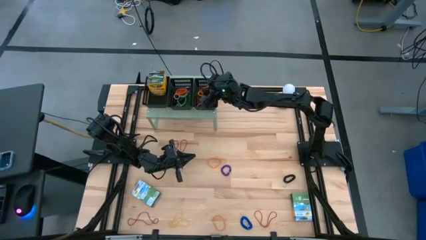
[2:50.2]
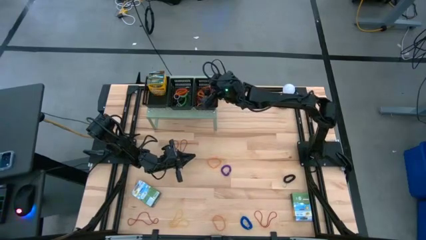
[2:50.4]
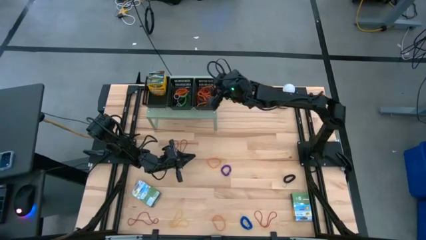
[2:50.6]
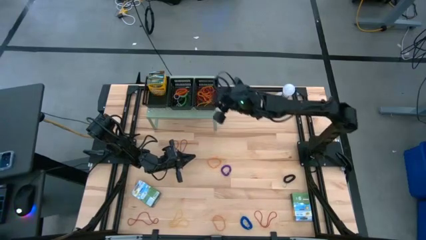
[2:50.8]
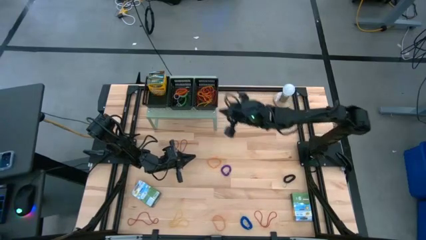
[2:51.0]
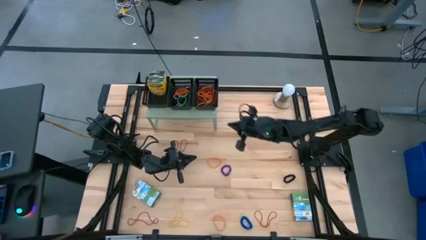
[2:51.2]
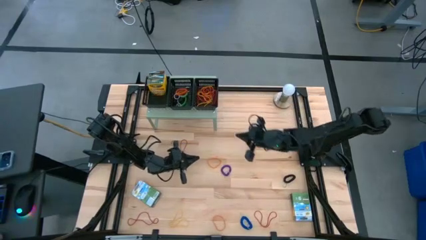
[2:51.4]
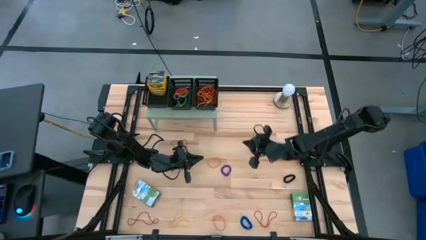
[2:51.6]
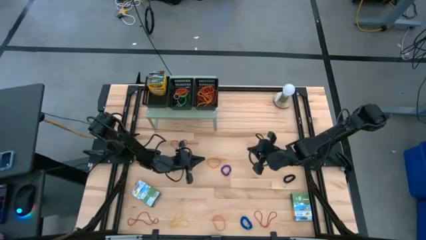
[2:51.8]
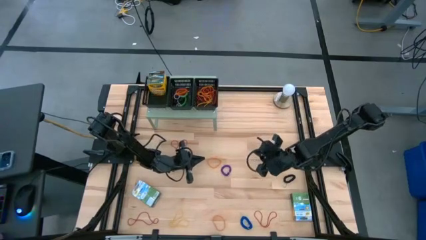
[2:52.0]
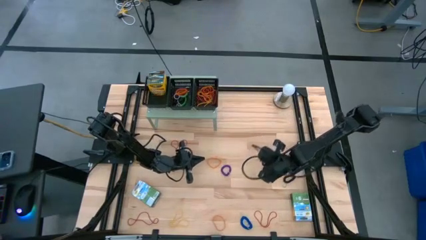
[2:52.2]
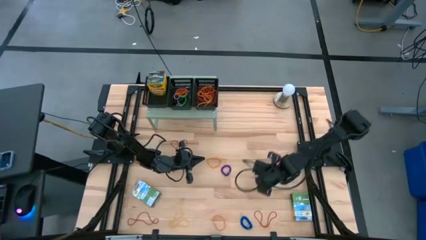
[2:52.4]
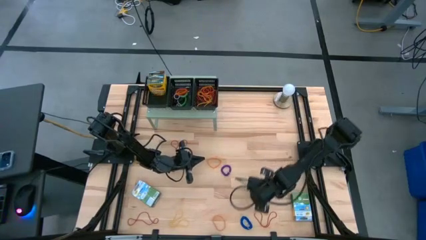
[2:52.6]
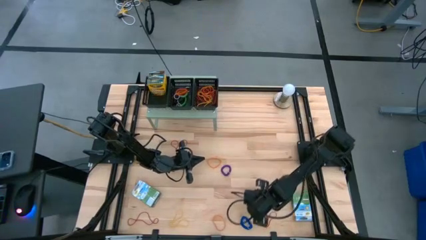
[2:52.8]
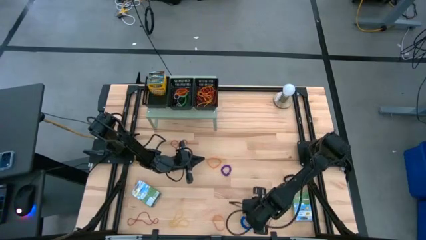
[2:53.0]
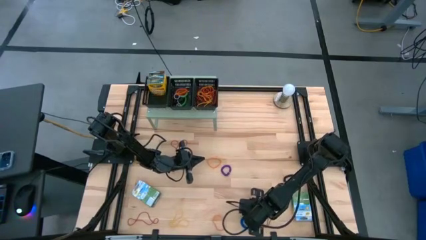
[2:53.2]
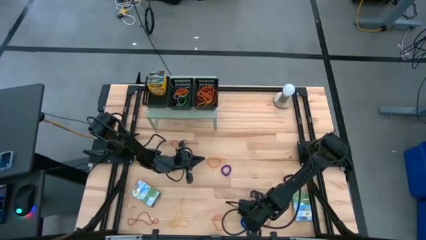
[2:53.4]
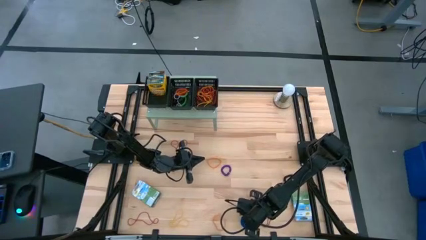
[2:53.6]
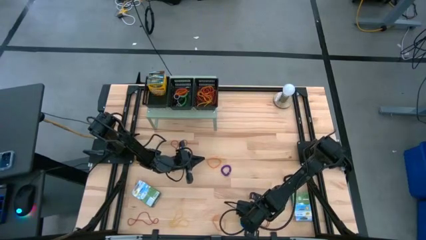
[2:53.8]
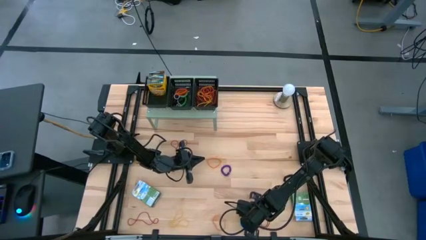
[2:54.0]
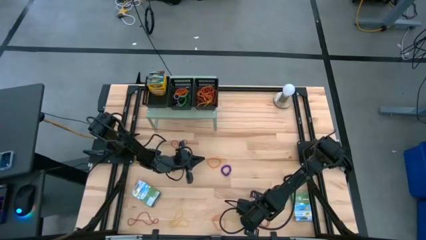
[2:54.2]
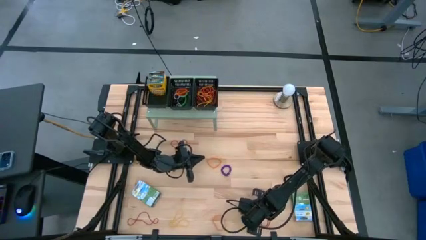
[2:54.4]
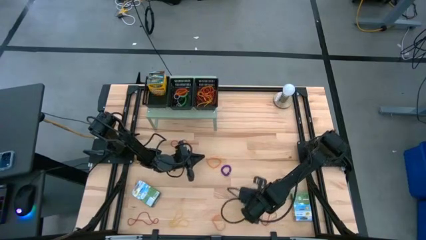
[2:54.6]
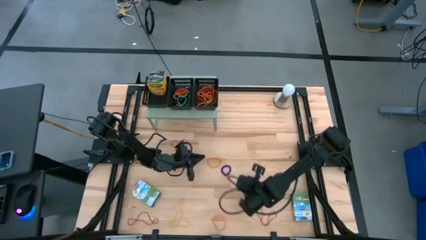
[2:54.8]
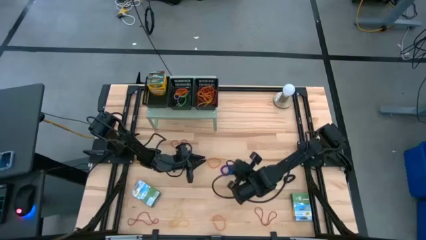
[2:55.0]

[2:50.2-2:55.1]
Task: Pick & Place Office Desk Supplies
Put the blue spring keychain into the middle black bin on the shelf

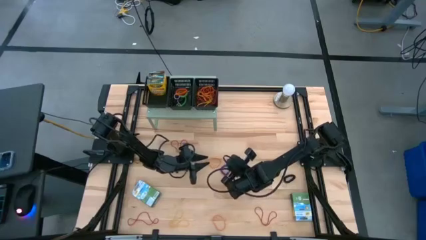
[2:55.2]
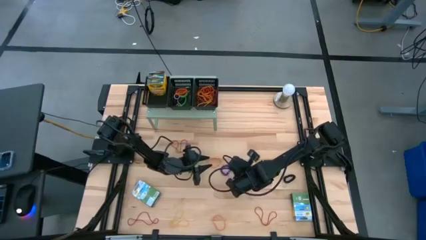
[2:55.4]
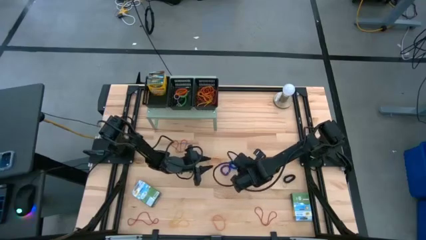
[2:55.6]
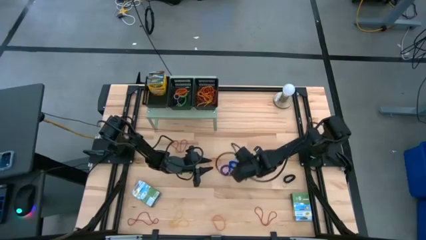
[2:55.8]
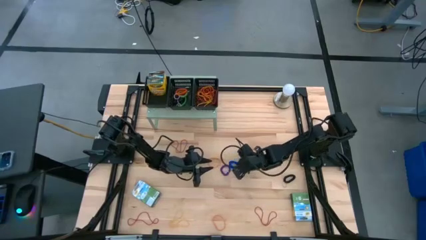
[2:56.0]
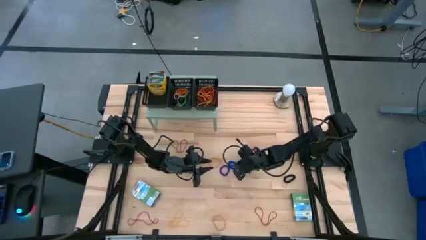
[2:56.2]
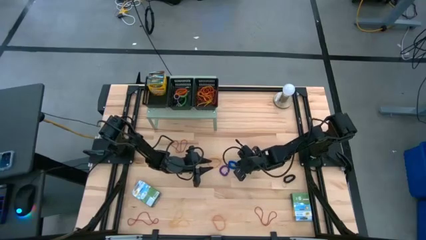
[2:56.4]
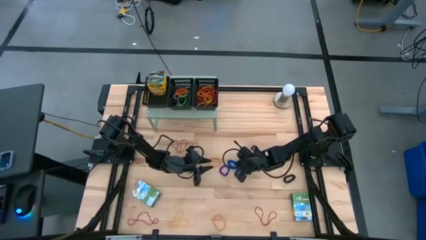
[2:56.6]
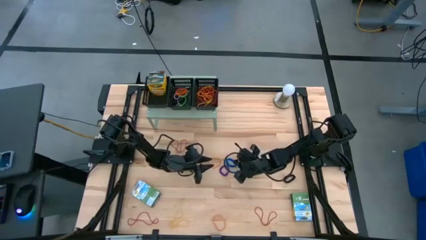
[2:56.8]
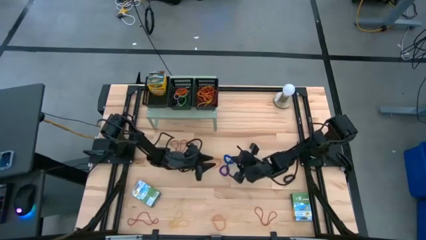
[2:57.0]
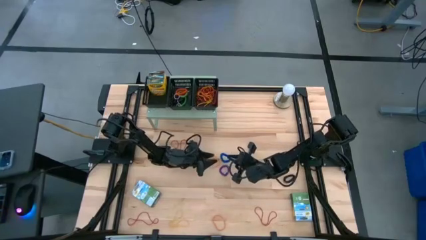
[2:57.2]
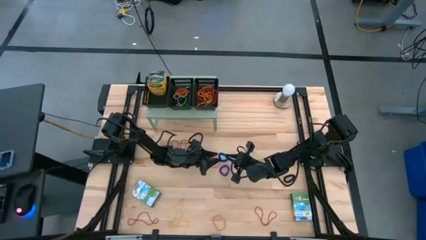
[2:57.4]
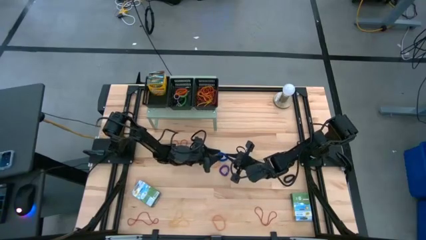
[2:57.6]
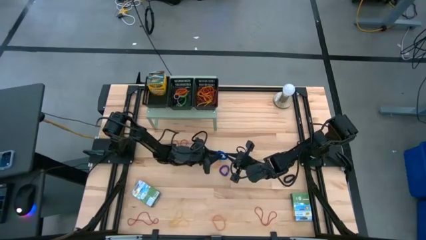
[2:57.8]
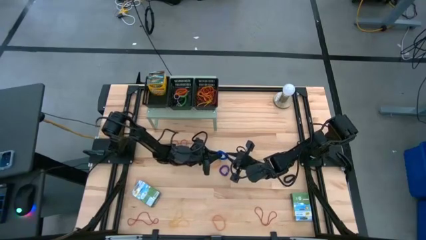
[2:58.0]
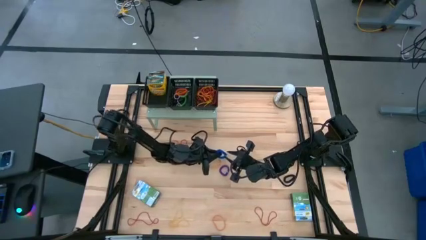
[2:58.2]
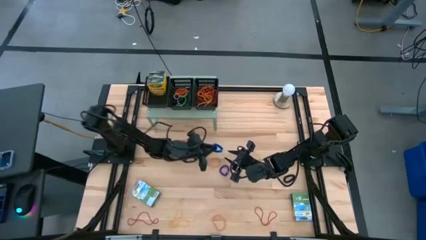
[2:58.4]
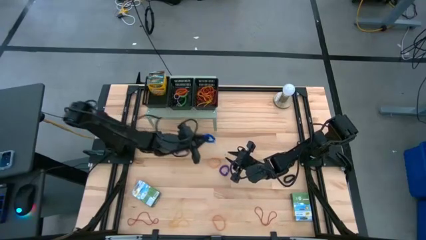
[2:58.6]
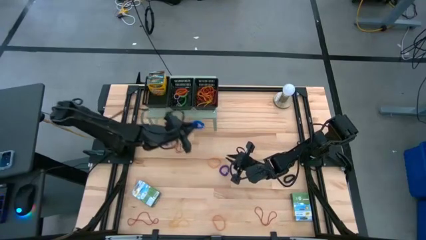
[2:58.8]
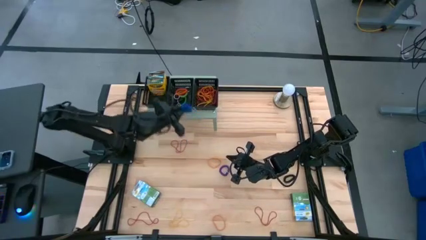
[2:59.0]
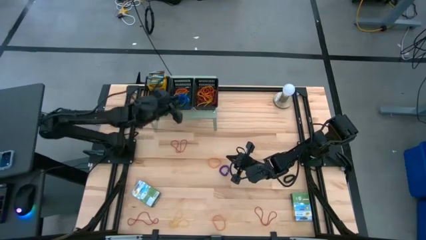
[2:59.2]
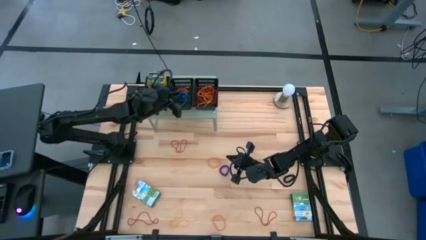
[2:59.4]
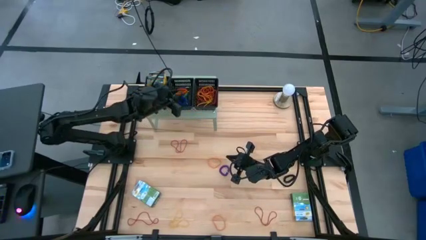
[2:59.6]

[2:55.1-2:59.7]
Put the blue spring keychain into the middle black bin on the shelf

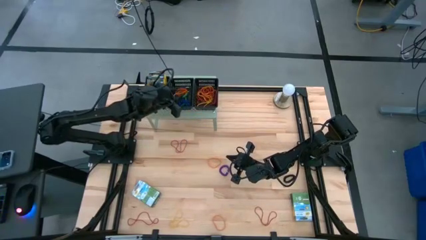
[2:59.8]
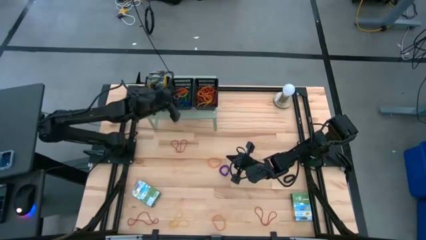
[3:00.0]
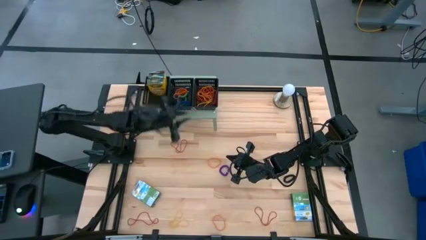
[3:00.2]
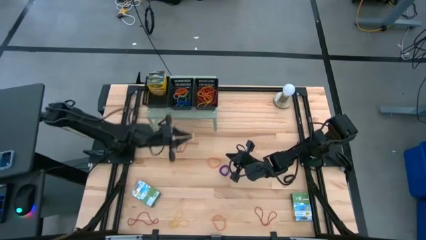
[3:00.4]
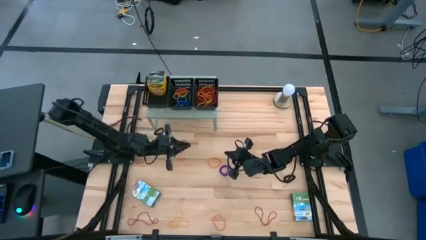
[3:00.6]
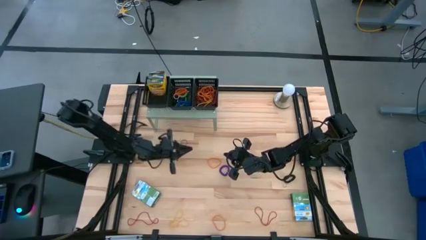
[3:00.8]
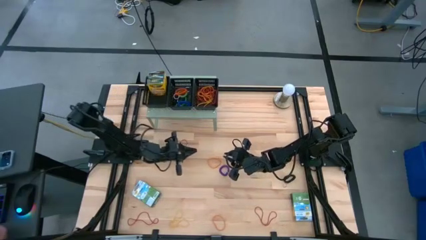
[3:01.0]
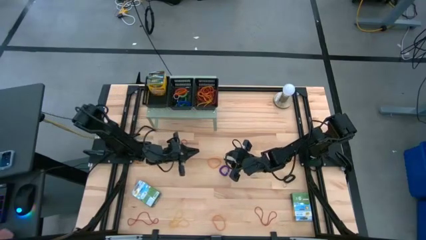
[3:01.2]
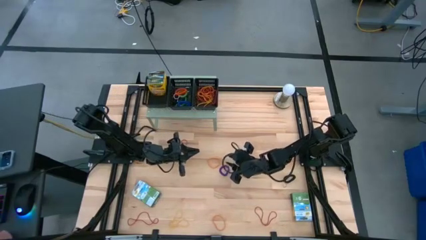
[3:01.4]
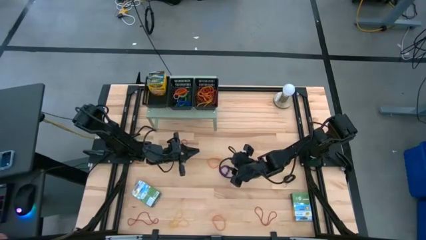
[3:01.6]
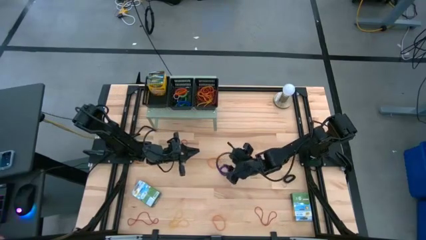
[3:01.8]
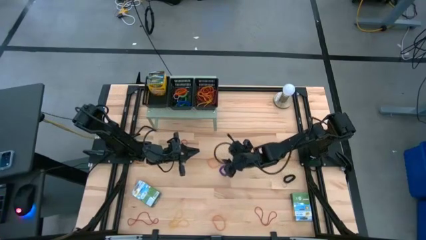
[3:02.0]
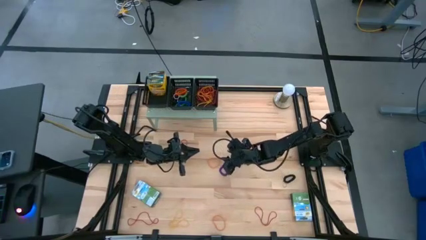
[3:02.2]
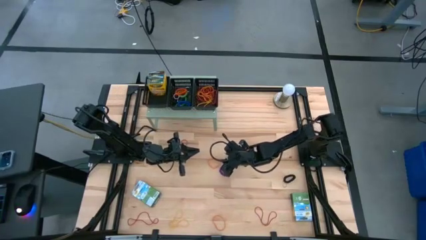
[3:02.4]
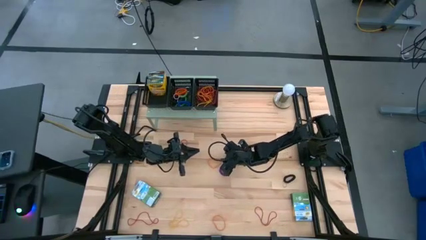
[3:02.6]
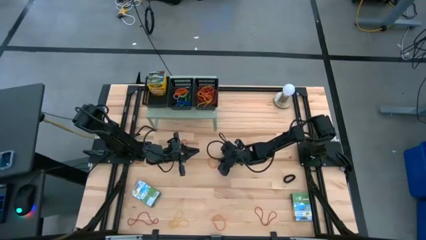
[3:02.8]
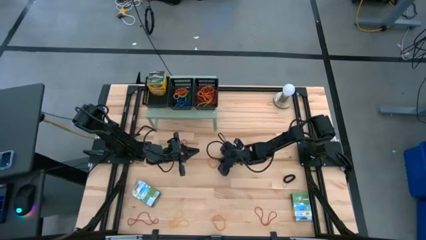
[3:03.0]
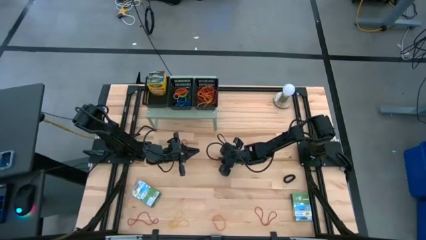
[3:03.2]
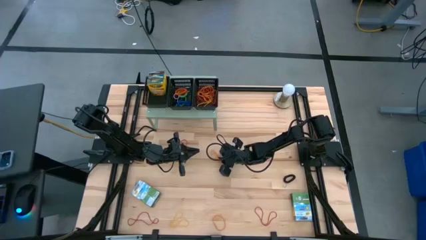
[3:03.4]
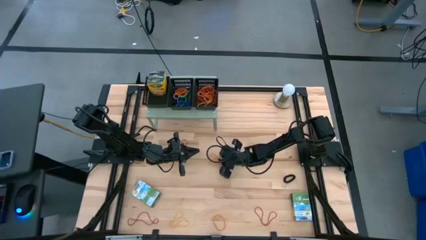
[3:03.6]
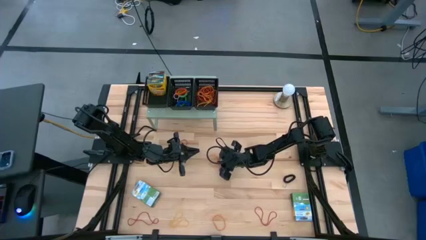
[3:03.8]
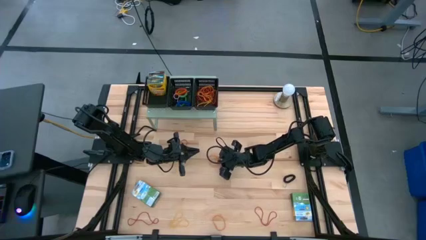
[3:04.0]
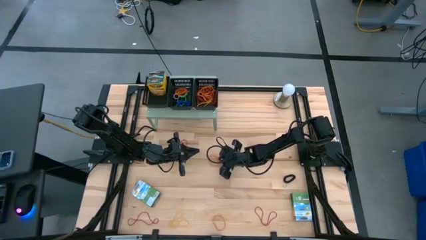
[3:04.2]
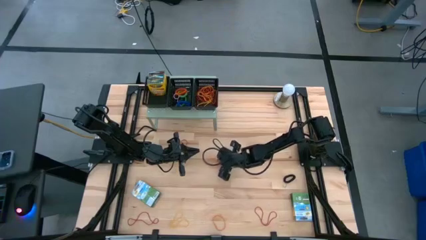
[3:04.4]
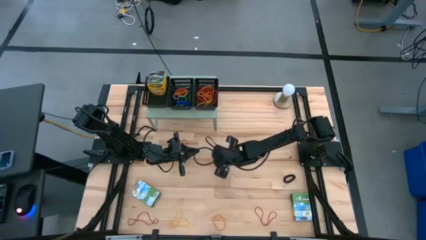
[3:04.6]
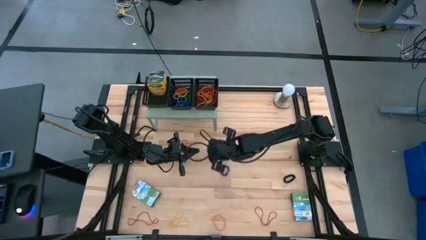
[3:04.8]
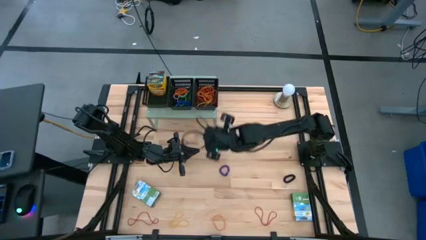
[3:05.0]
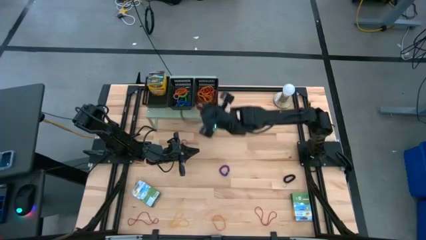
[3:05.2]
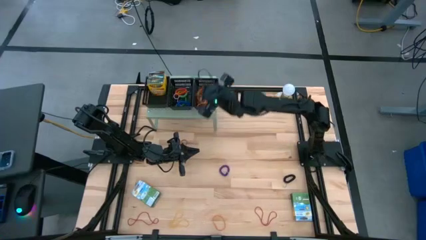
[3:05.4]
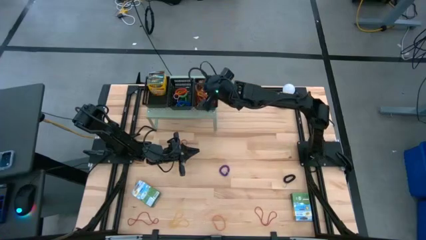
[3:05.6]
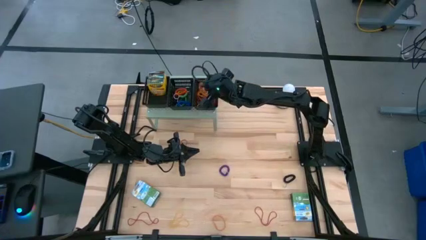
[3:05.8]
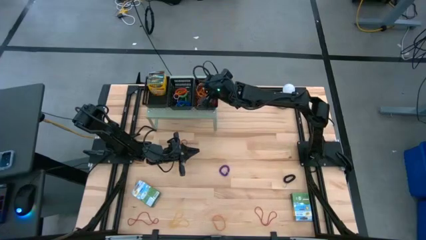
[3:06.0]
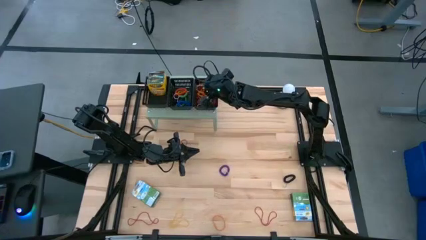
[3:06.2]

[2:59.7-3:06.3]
Put the orange rubber band into the right black bin on the shelf

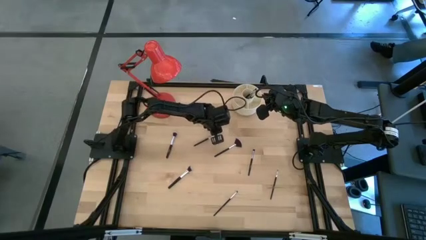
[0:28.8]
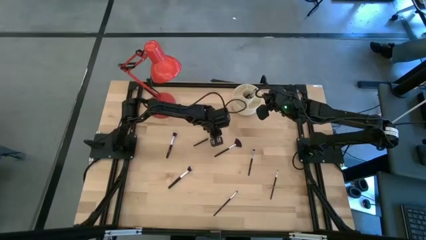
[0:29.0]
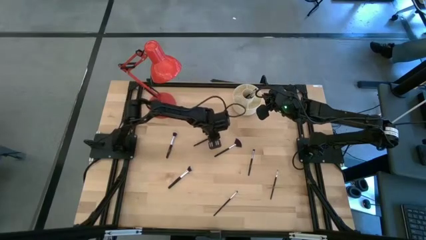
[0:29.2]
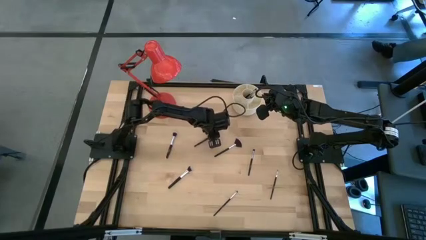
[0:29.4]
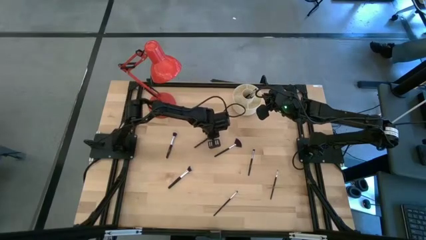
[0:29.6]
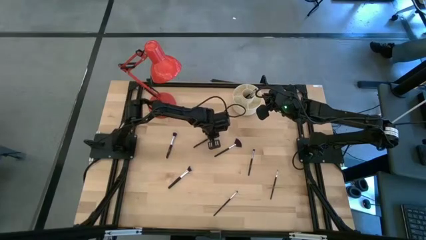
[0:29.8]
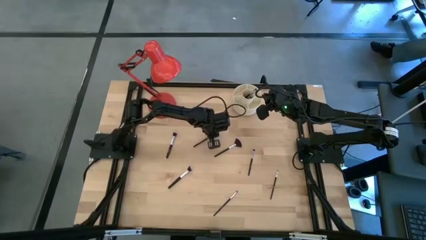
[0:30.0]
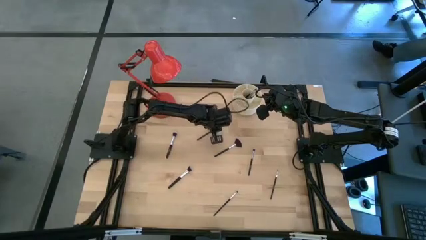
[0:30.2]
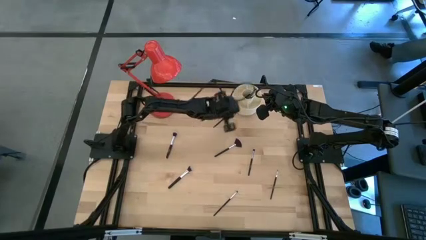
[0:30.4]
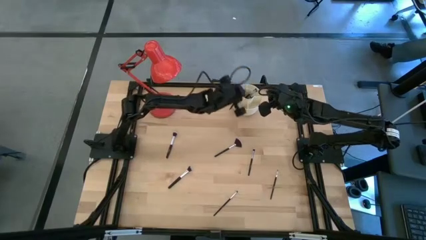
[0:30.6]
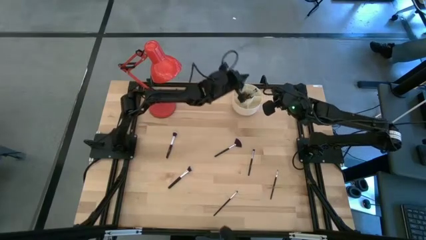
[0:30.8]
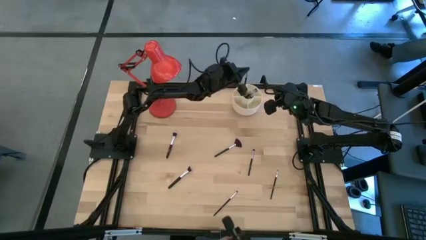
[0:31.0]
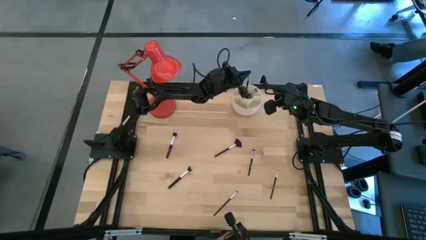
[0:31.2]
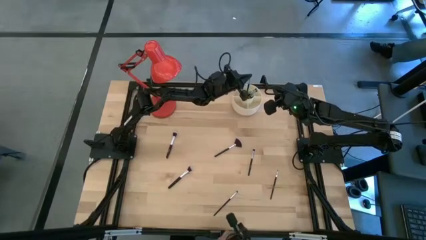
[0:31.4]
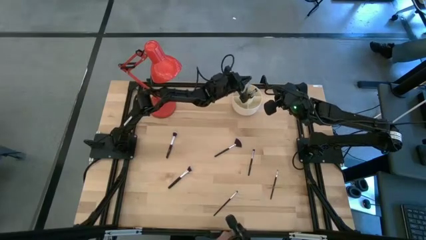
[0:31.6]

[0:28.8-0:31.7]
Task: Put items in baskets/containers
Put the black eyeshadow brush into the white organizer
